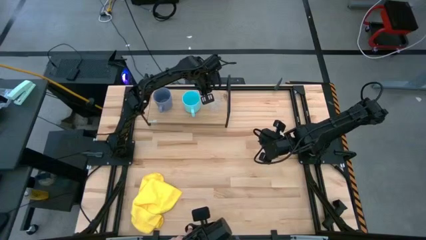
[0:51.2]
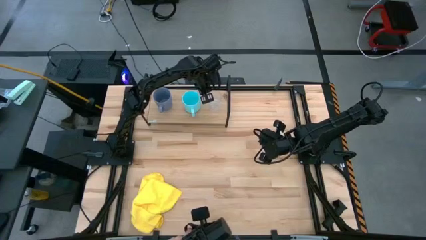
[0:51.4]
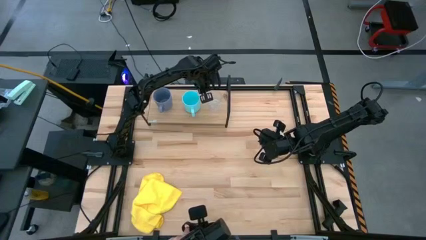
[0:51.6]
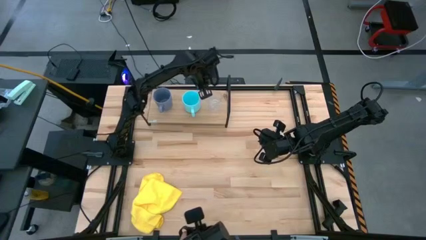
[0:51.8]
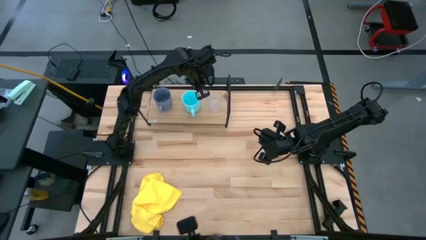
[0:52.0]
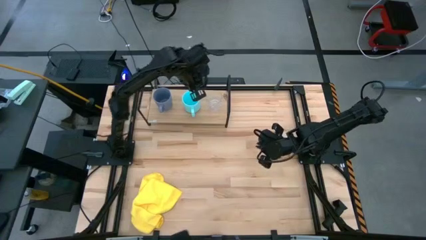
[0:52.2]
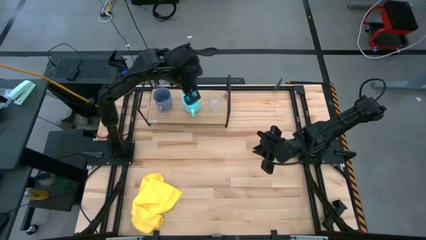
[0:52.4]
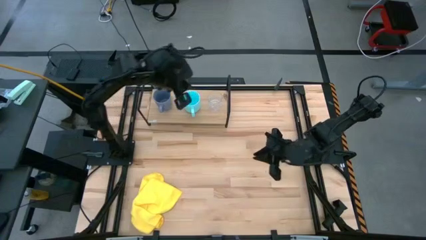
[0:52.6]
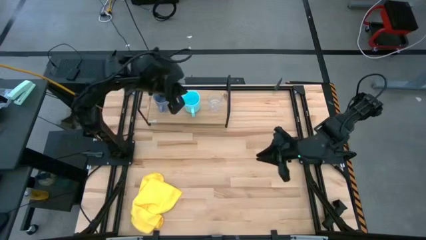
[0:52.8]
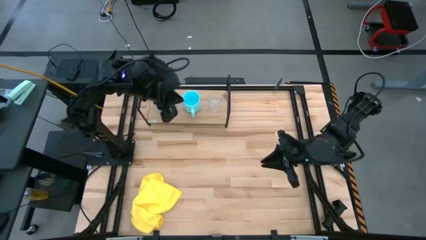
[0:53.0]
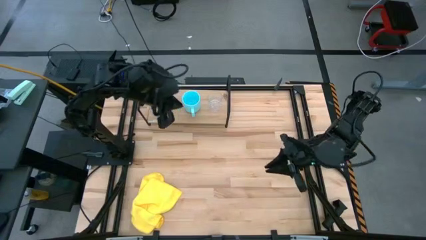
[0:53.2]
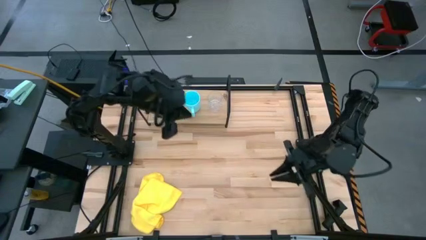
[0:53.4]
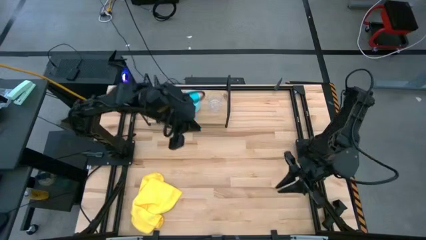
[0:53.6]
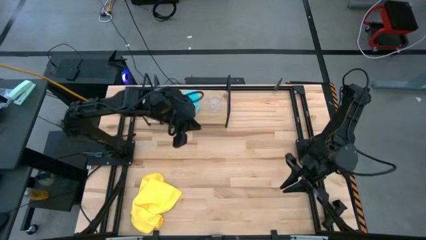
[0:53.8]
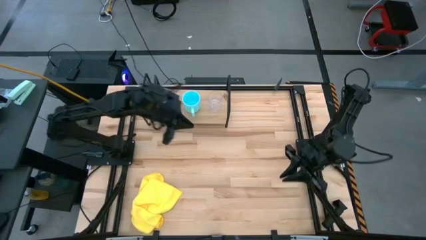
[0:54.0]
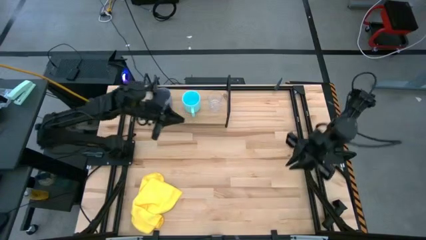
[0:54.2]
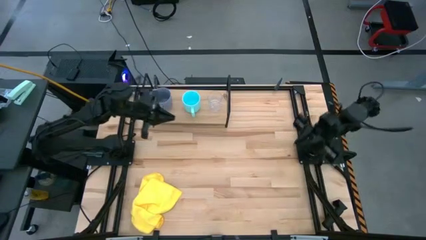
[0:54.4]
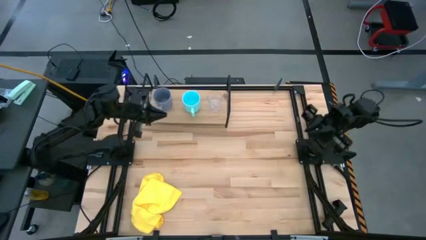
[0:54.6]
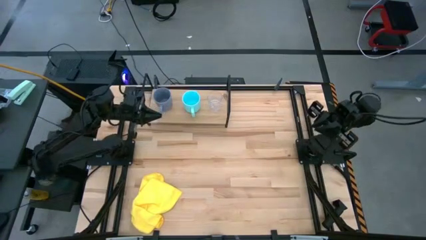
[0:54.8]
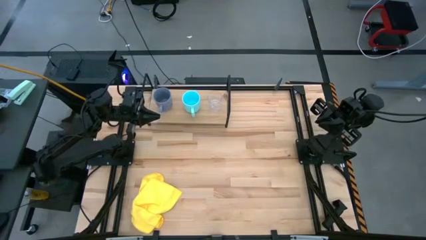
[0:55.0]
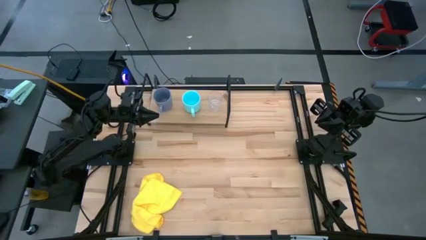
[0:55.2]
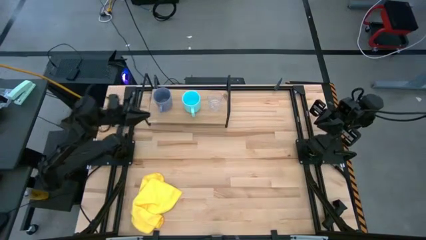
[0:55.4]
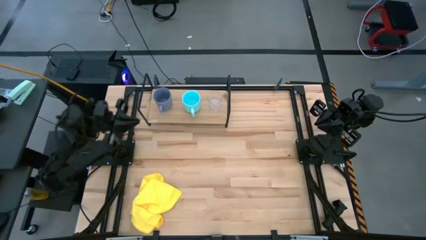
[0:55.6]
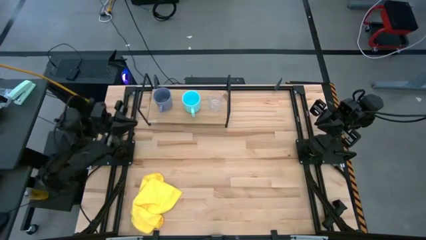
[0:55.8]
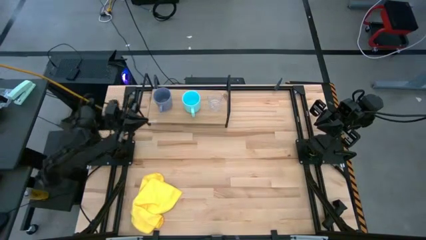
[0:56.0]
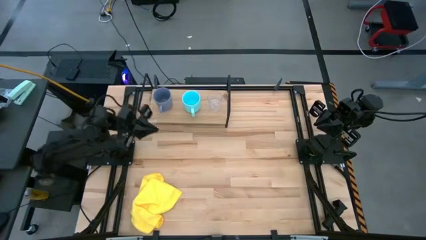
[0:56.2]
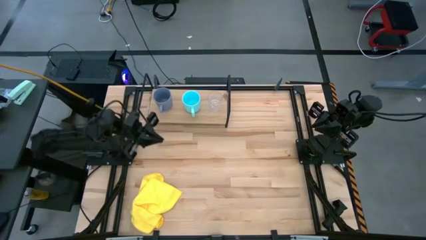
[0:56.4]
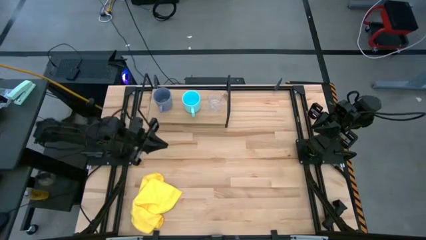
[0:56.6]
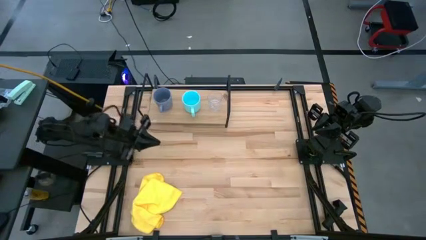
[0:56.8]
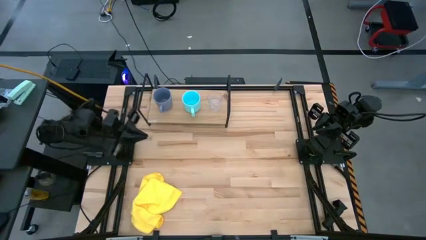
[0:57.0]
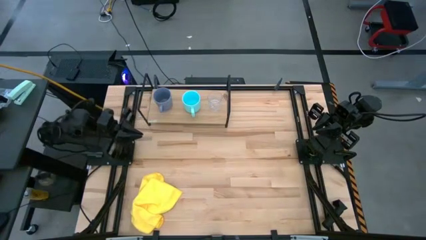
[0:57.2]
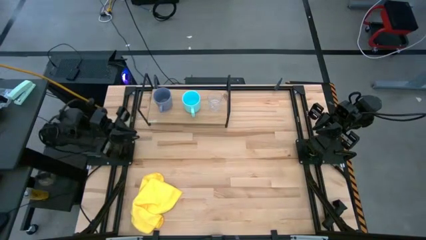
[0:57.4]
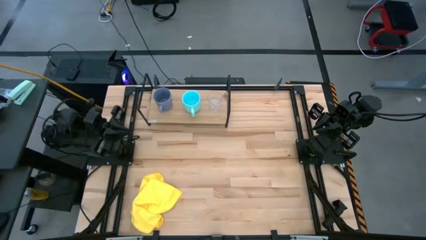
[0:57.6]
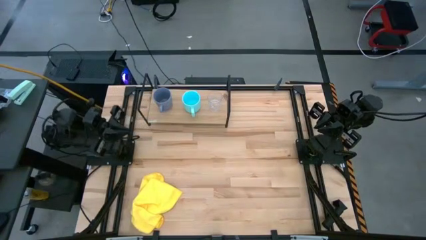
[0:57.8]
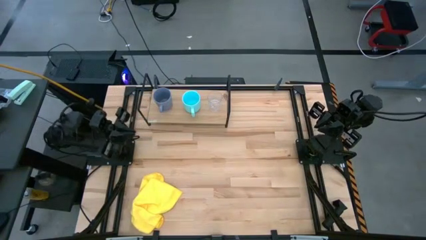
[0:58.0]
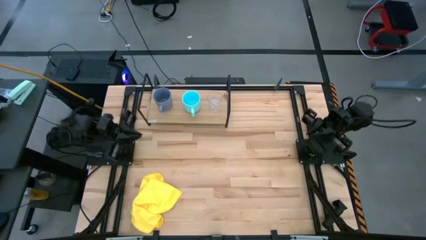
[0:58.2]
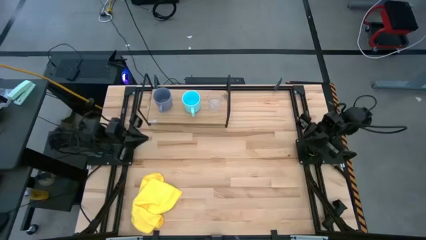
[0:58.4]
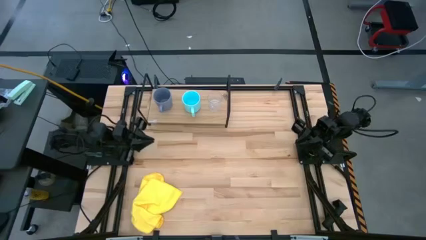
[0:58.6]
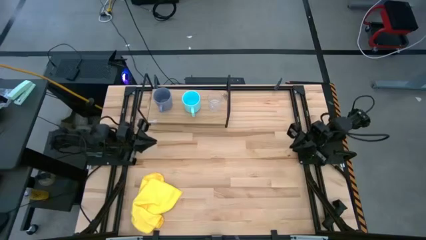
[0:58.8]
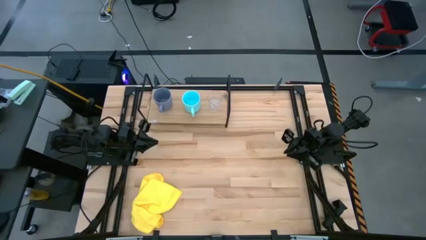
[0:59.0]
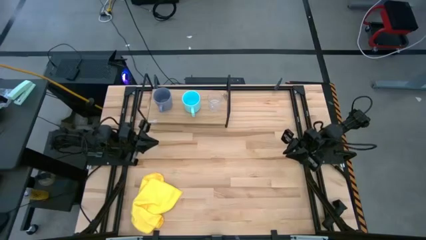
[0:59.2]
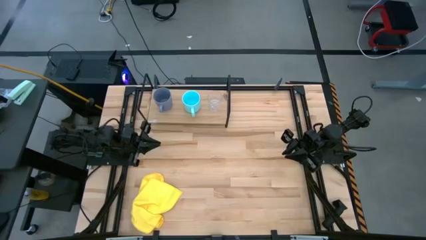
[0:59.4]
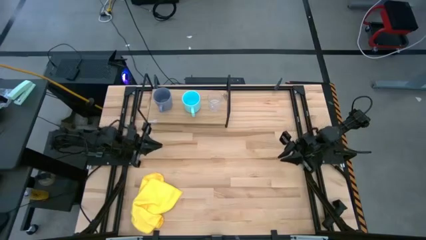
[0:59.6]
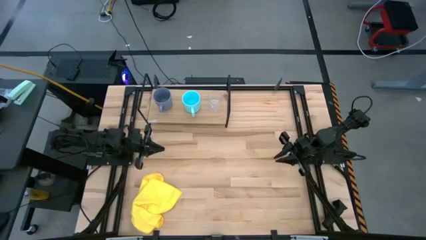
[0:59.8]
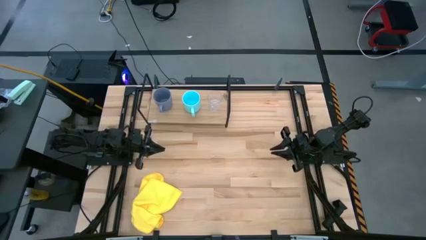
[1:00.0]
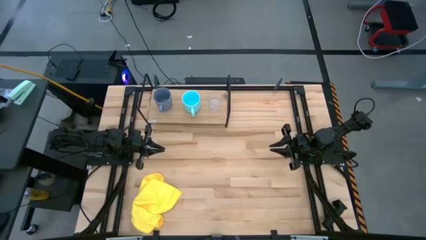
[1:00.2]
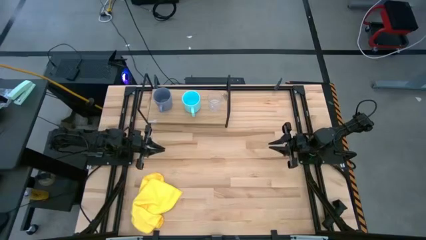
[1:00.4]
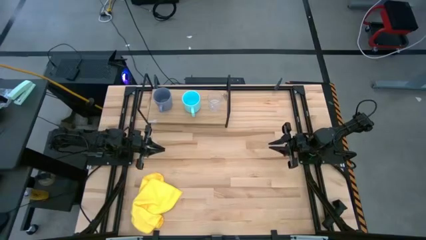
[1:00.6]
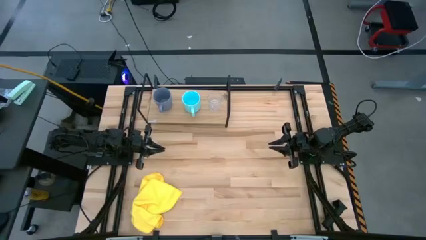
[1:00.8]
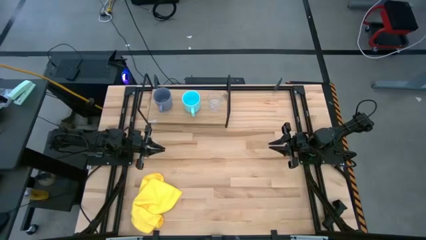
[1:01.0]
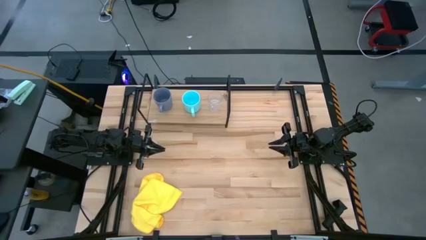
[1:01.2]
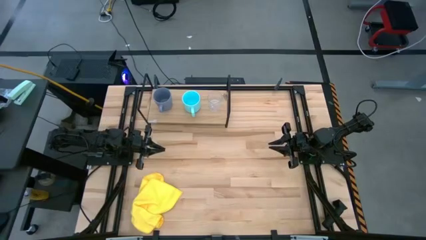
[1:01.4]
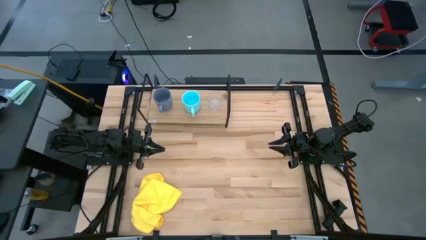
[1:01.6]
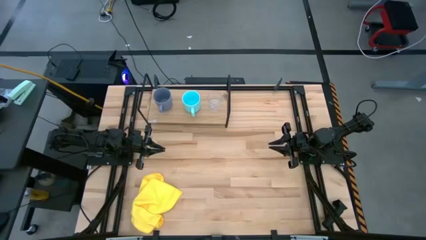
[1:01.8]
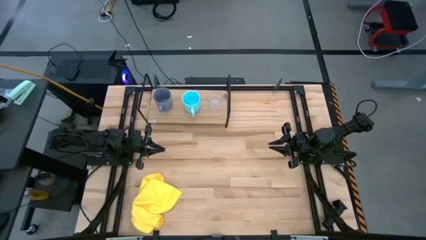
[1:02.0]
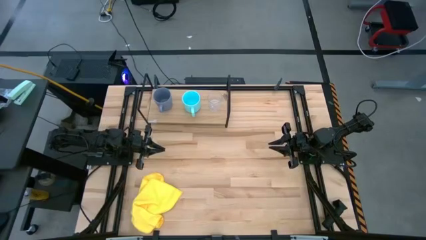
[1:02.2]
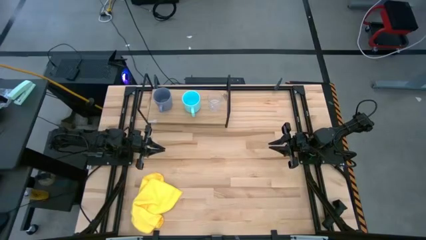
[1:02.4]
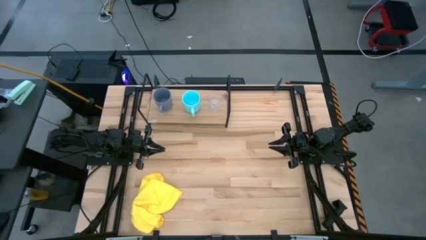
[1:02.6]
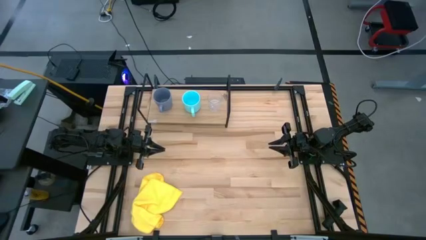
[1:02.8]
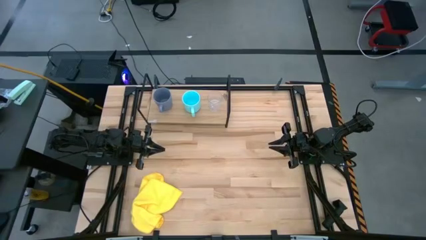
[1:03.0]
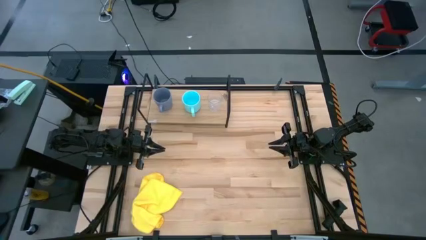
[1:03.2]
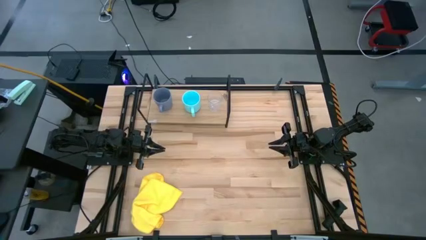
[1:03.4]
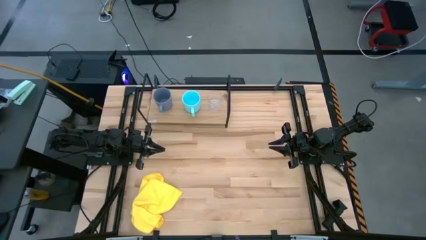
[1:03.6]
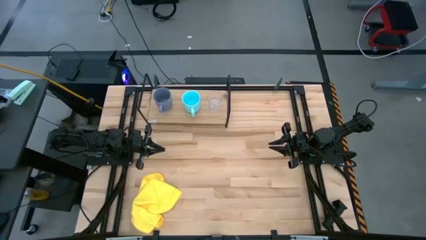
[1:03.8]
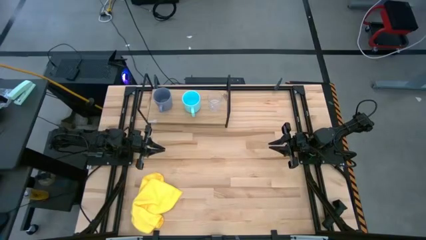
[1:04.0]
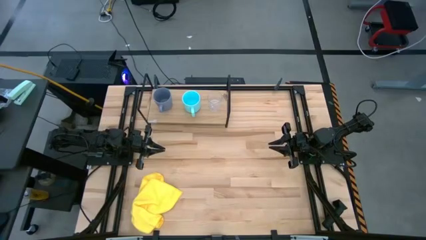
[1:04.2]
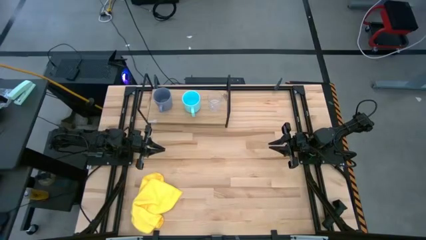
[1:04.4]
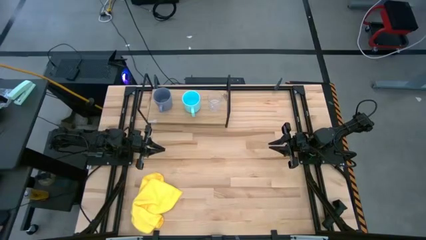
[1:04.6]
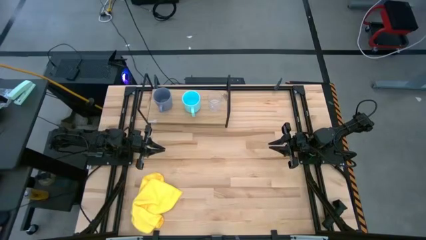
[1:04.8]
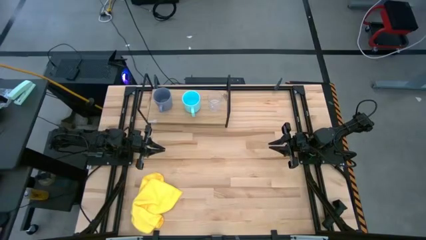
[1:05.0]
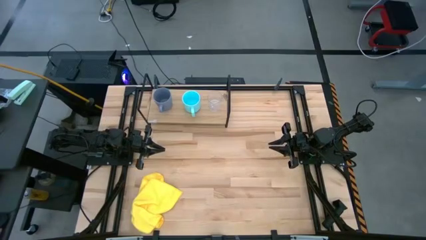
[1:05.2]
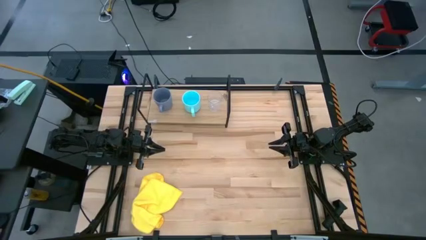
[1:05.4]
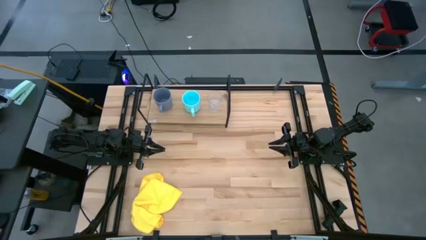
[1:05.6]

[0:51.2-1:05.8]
Task: Stack small to large cups/mugs on shelf
Return to Home Position
